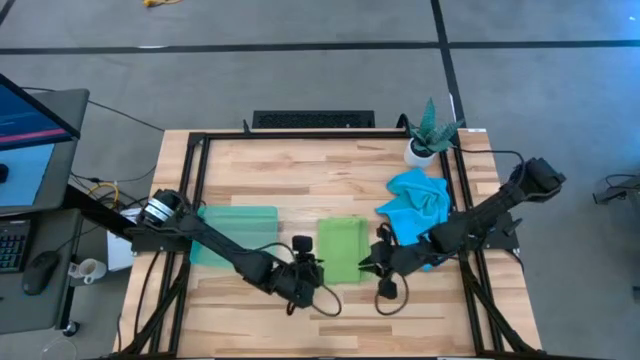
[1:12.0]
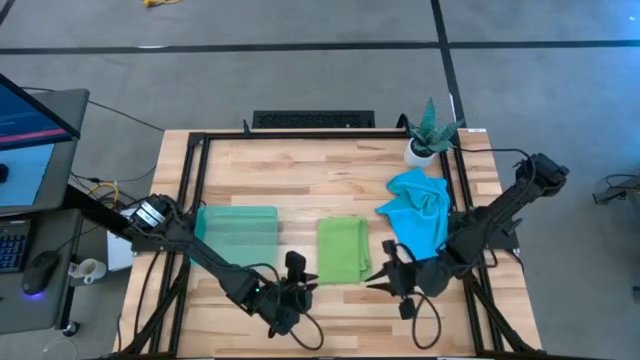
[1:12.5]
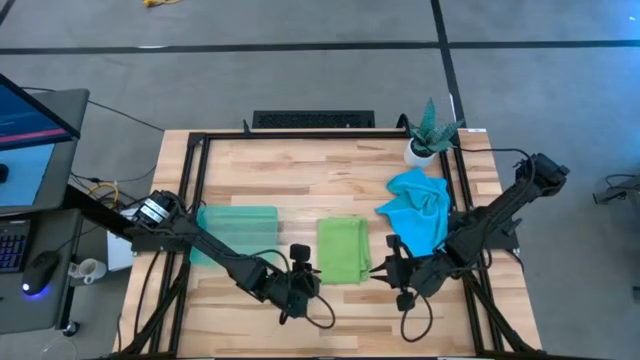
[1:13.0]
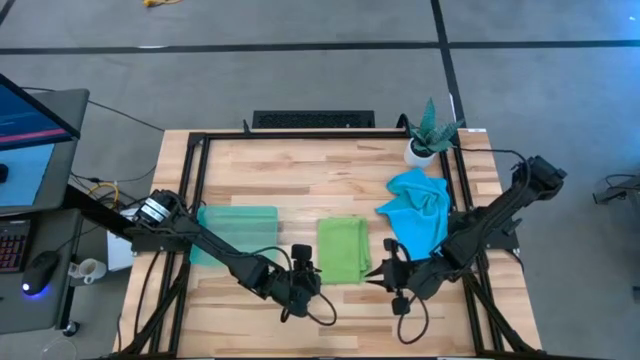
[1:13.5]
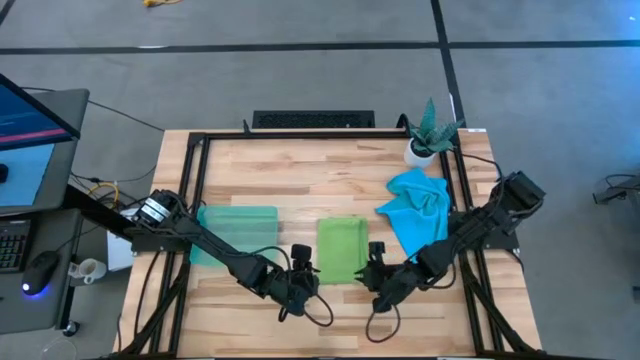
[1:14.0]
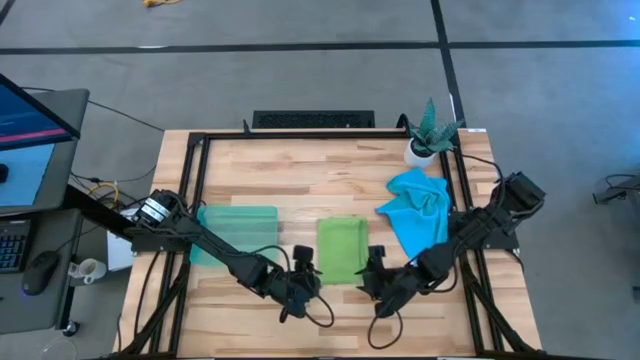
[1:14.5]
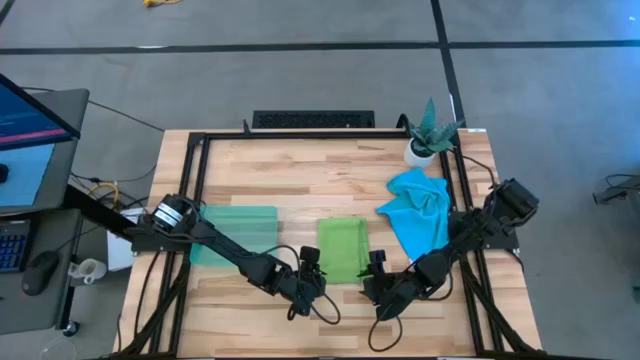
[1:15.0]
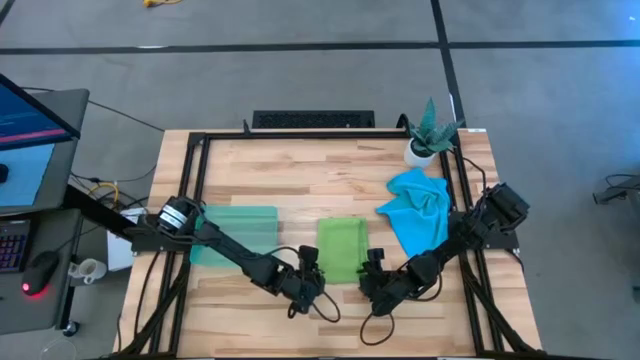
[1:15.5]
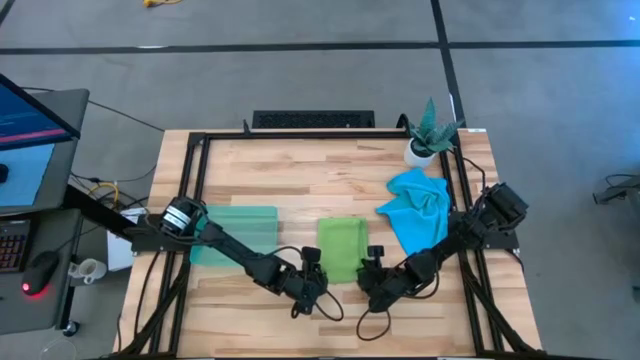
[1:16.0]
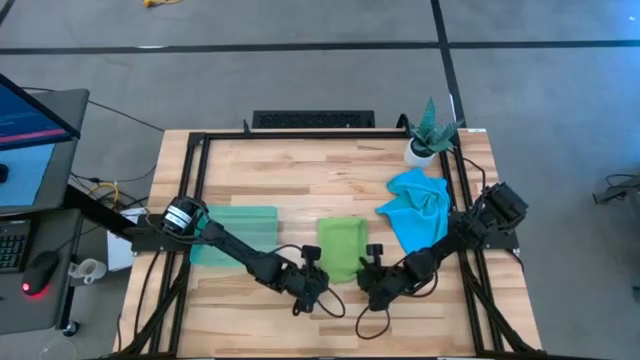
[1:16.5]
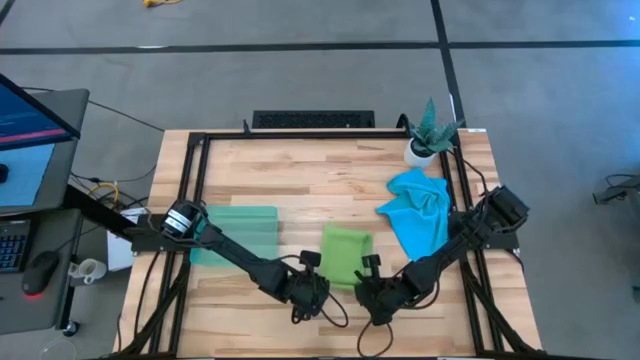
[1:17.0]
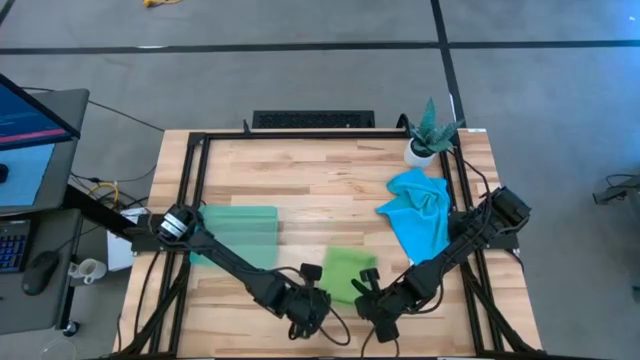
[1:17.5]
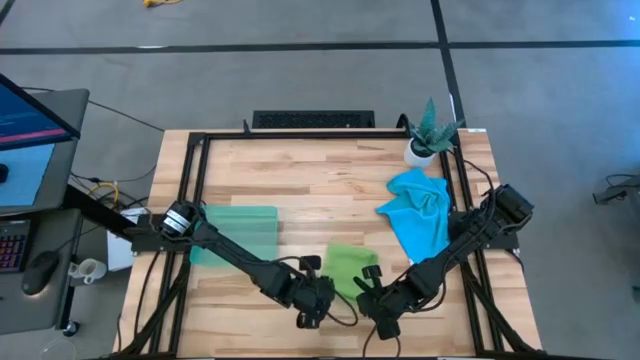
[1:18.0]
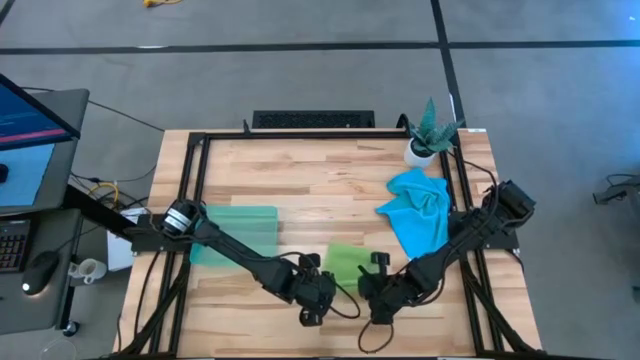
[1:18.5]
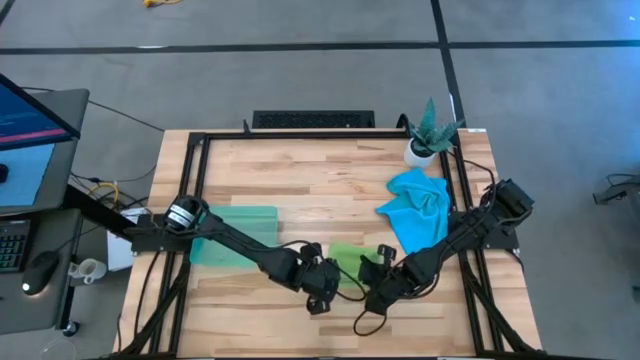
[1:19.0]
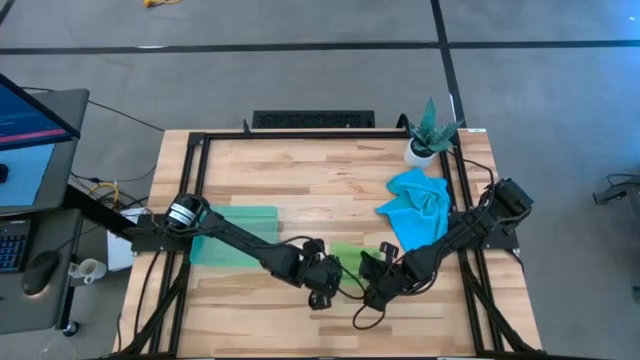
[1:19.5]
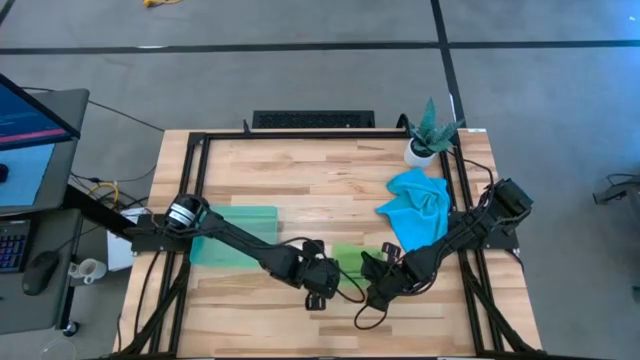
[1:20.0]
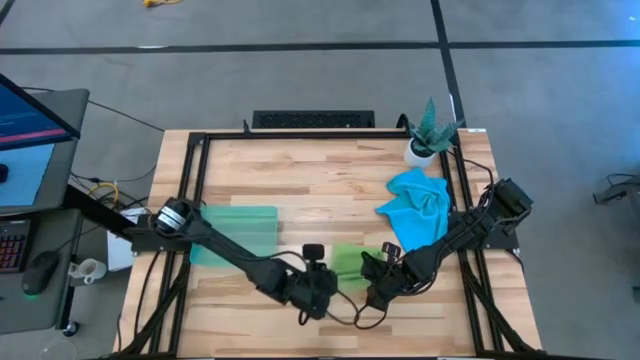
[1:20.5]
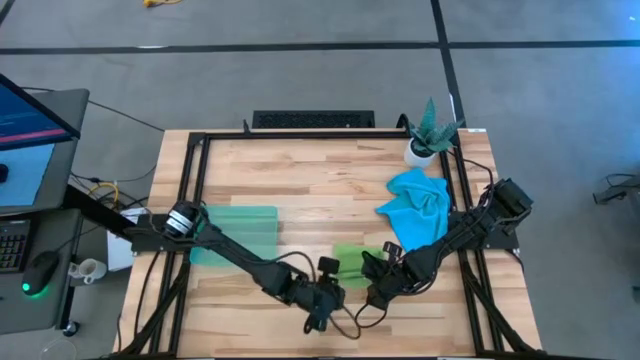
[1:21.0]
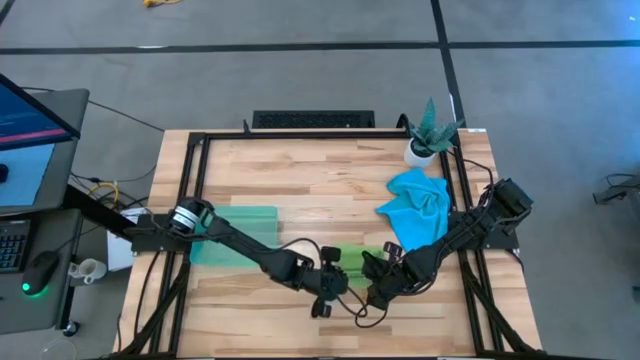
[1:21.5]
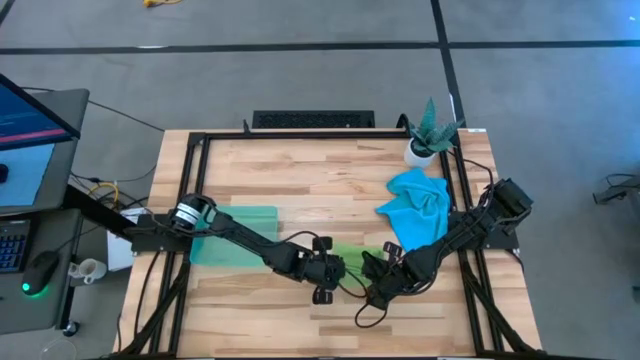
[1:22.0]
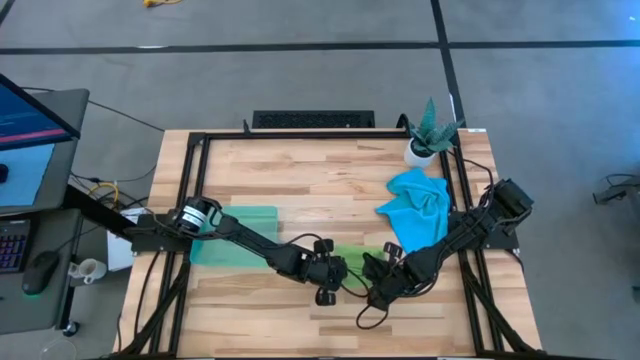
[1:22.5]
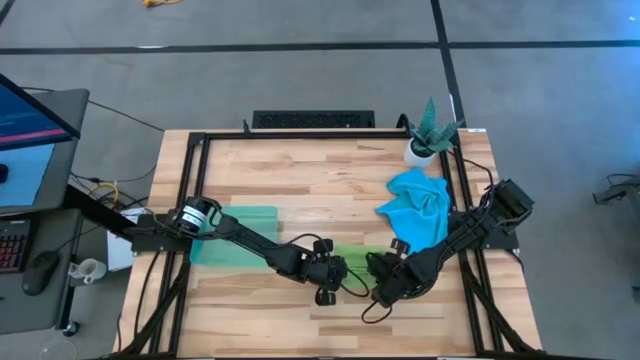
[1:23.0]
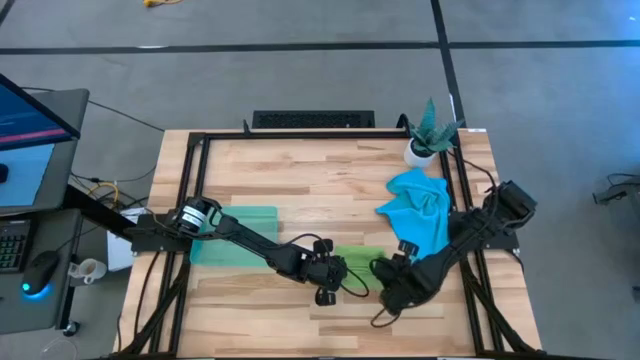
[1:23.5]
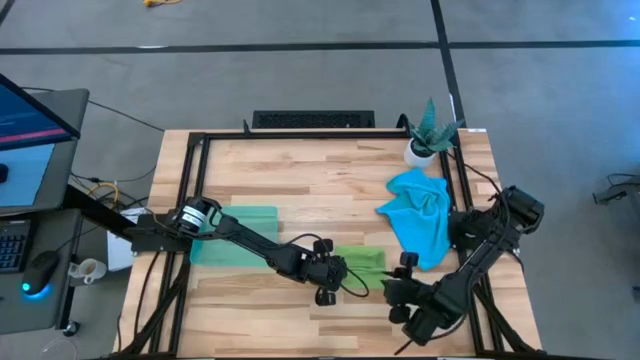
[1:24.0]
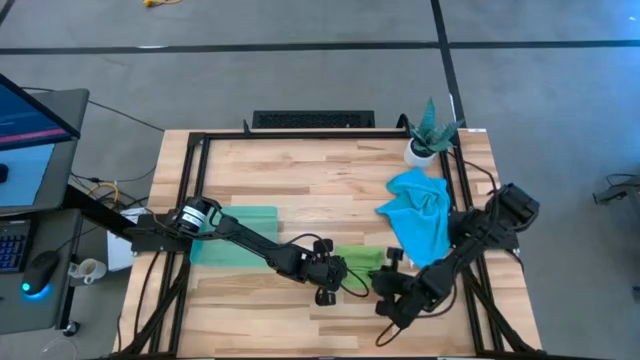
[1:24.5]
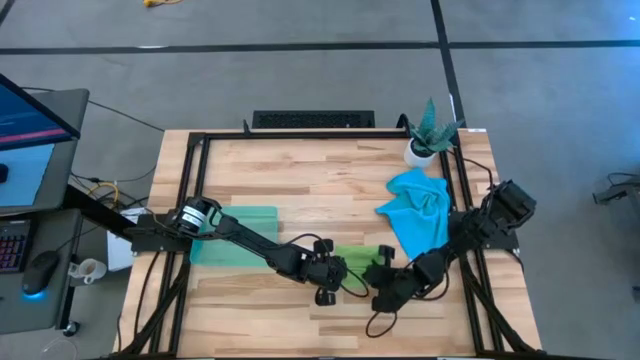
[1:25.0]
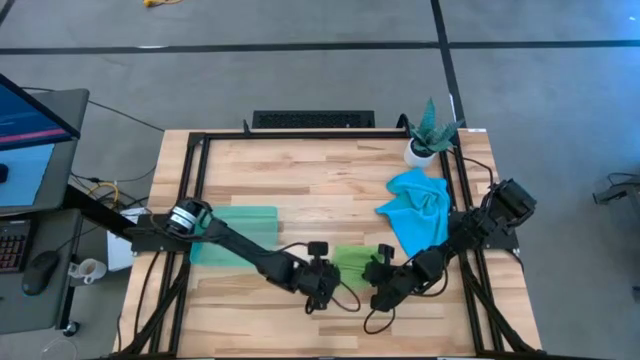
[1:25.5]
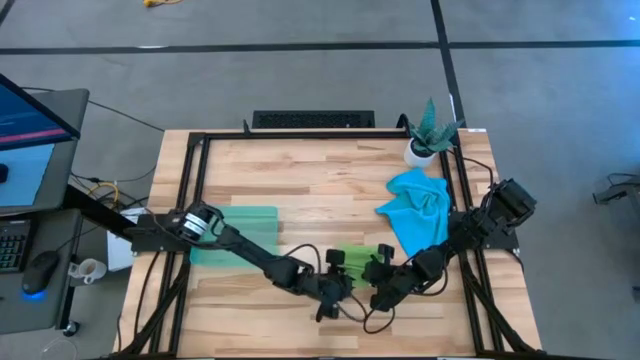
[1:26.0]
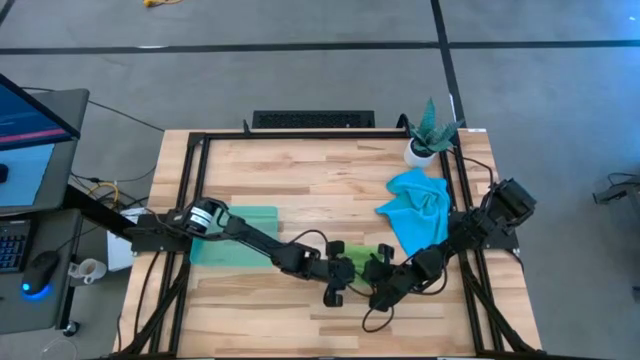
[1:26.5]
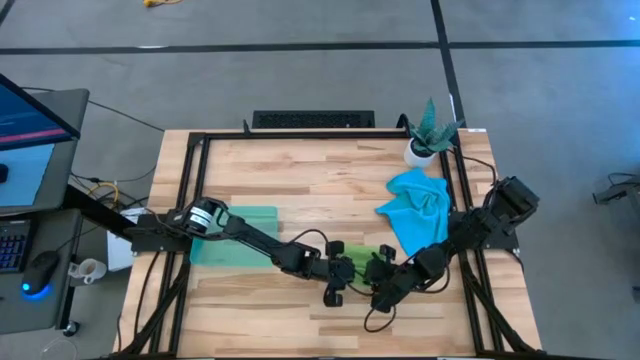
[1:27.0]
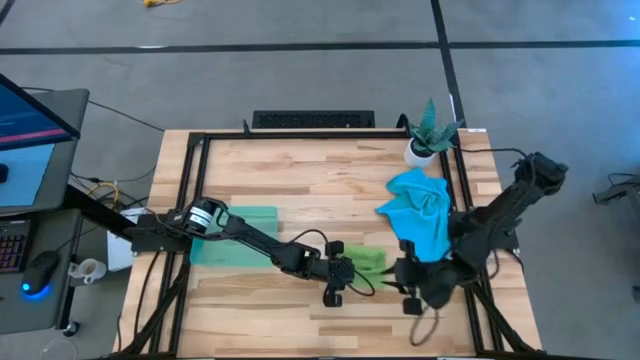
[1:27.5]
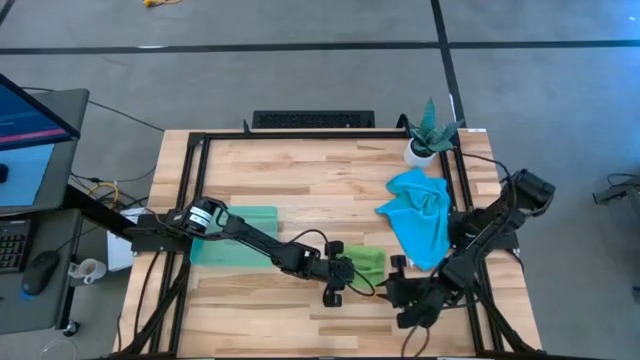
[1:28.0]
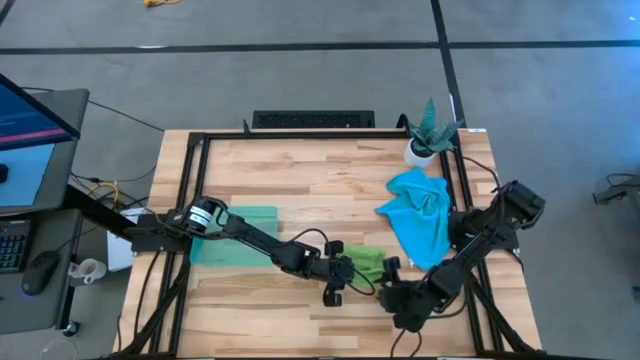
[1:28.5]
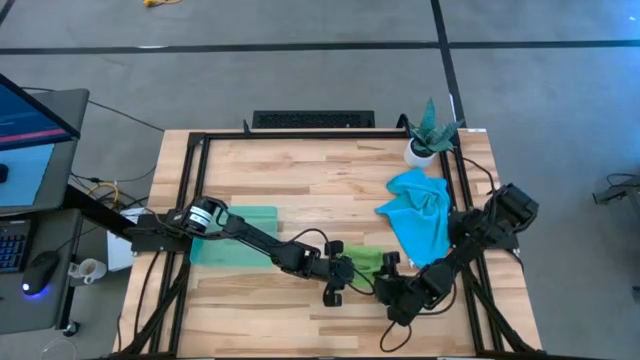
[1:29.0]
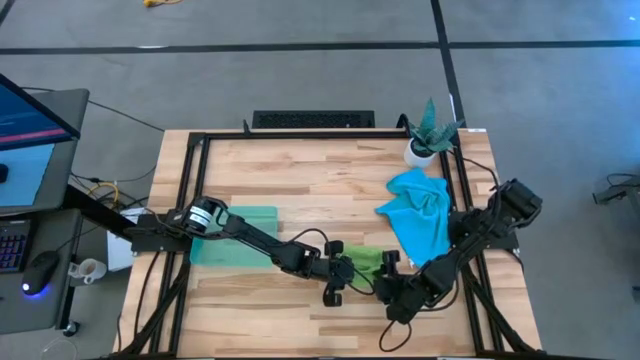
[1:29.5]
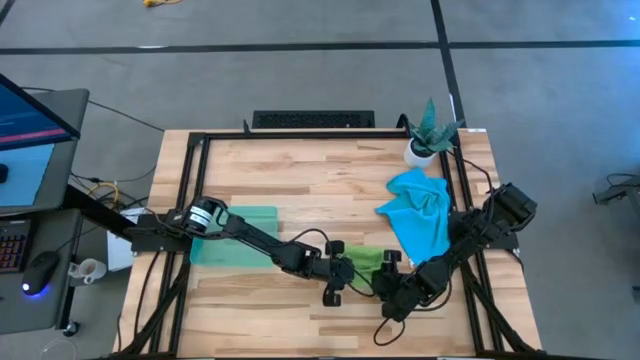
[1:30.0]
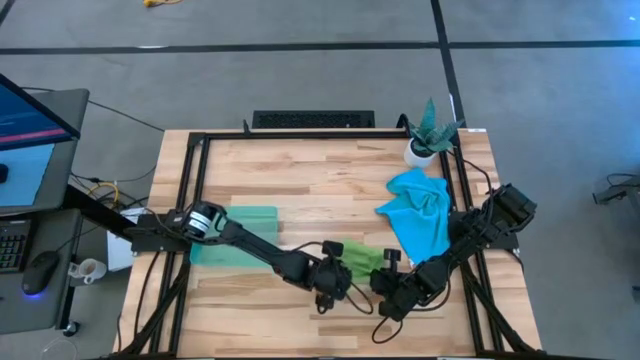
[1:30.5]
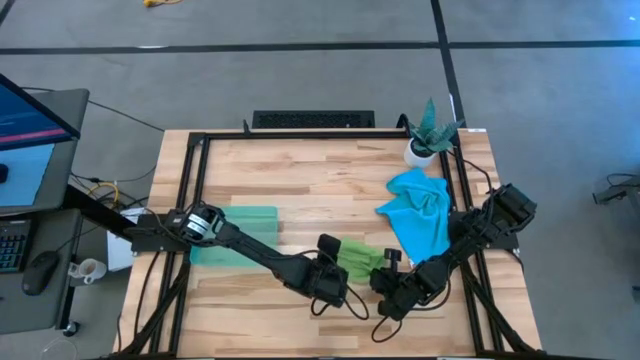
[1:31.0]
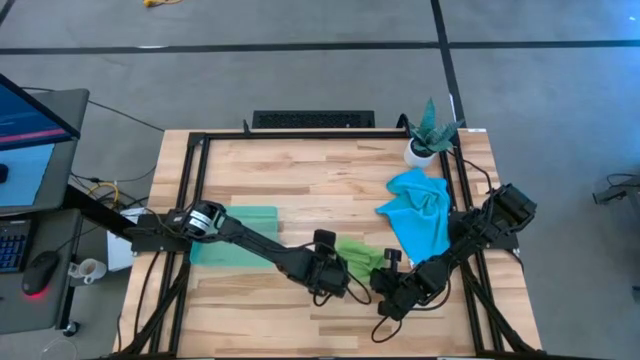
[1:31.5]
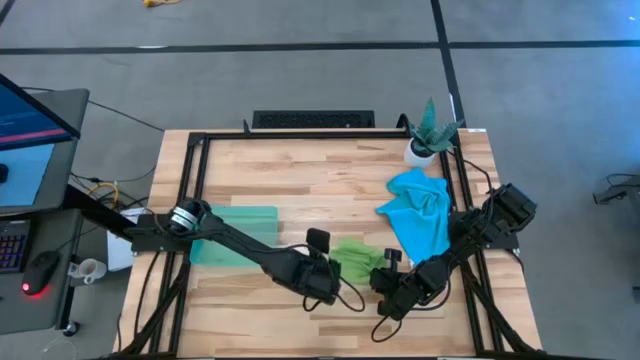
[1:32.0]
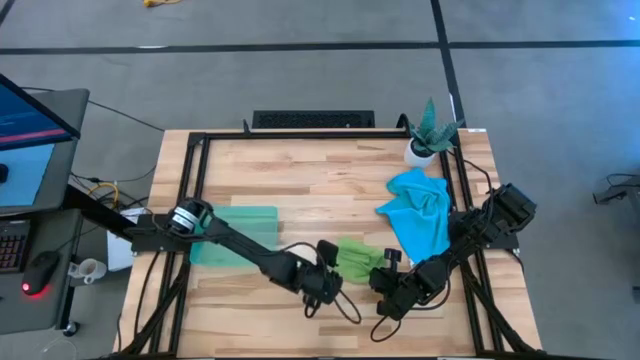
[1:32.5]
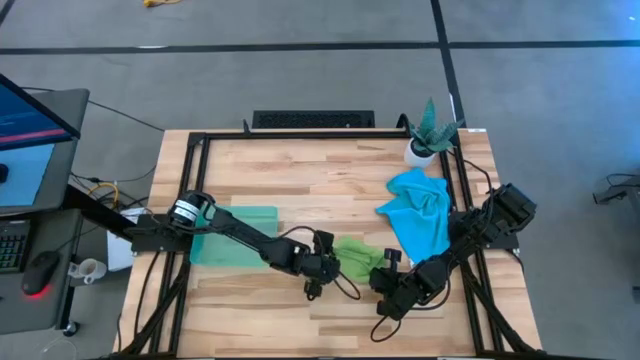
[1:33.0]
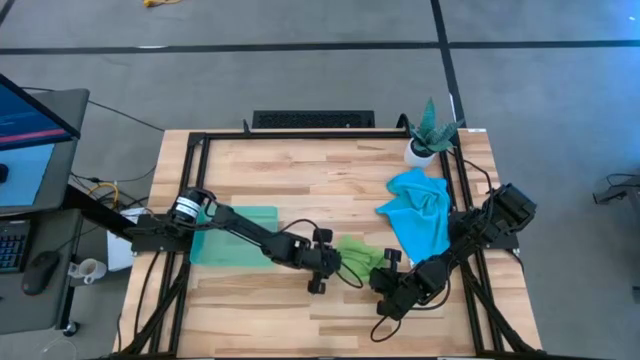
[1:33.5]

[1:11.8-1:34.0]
Task: Roll microfiber towels into tight, uniform cylinder then place into a basket
Roll the green towel
